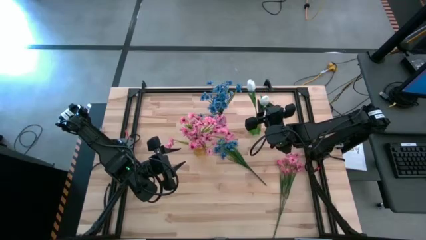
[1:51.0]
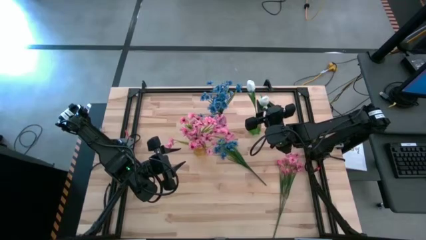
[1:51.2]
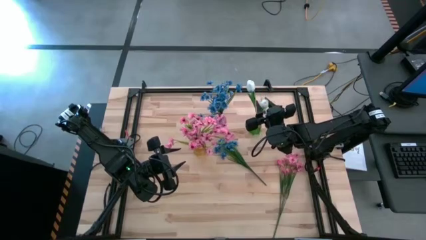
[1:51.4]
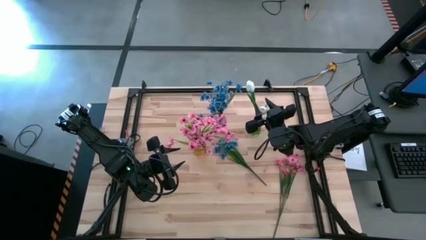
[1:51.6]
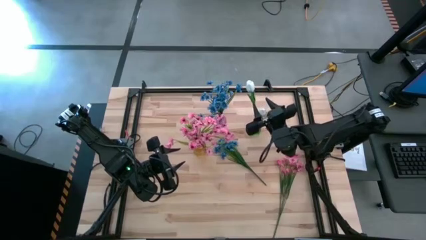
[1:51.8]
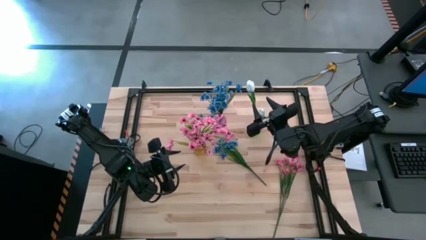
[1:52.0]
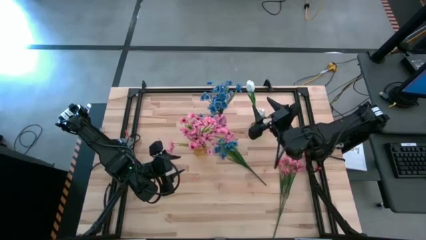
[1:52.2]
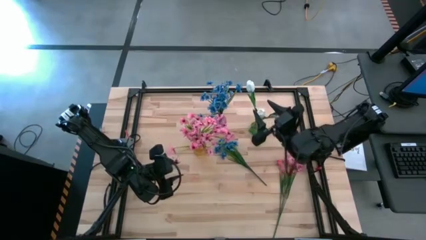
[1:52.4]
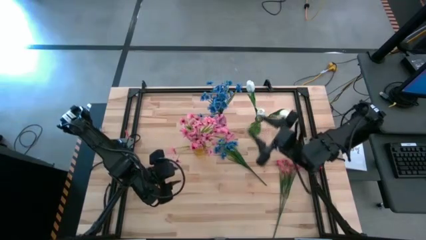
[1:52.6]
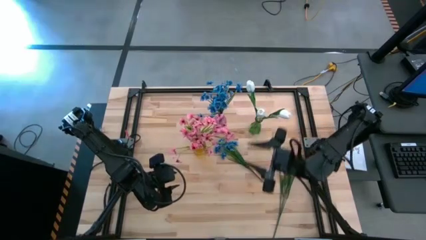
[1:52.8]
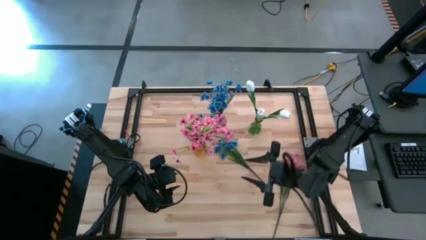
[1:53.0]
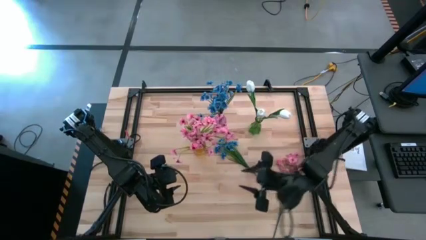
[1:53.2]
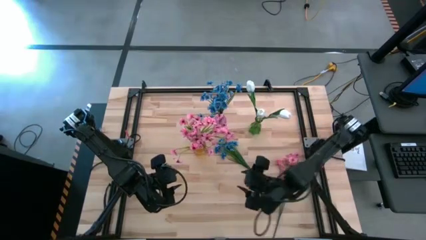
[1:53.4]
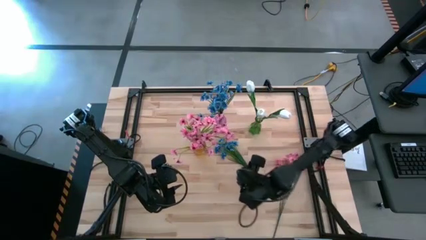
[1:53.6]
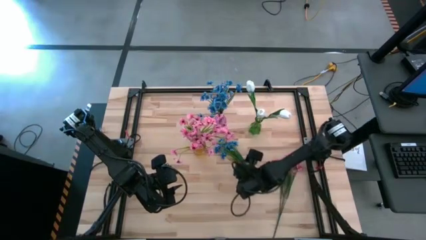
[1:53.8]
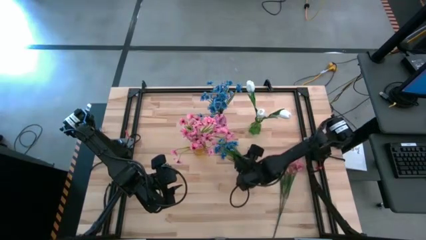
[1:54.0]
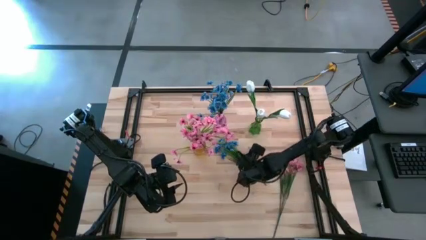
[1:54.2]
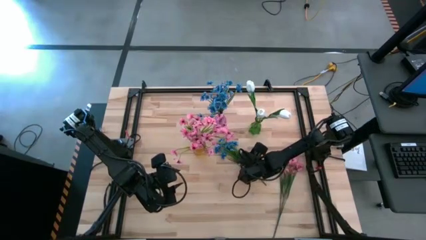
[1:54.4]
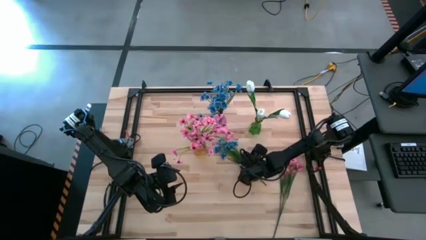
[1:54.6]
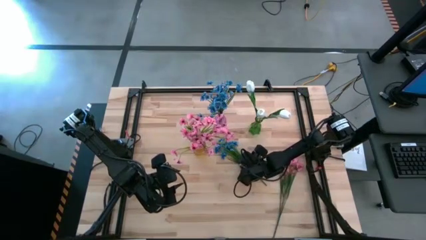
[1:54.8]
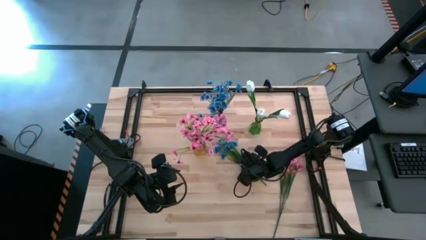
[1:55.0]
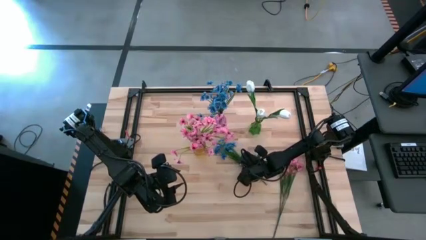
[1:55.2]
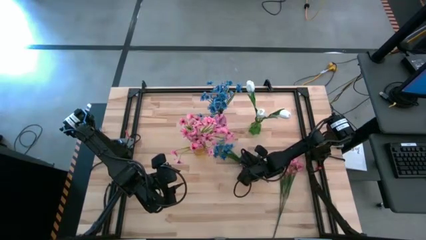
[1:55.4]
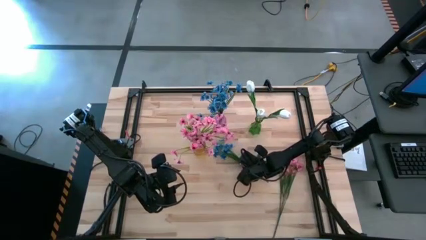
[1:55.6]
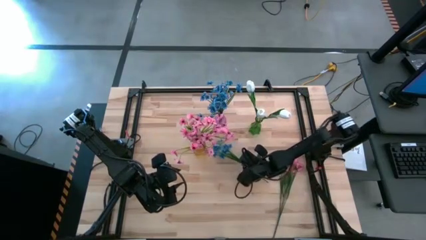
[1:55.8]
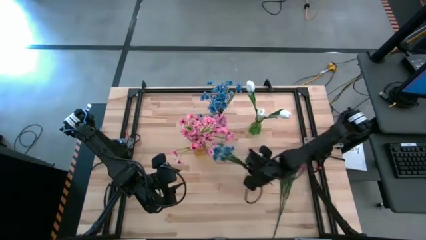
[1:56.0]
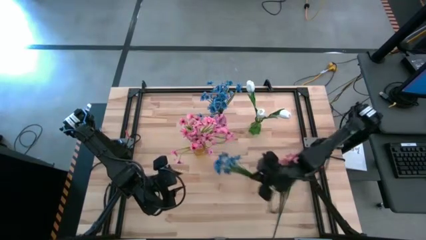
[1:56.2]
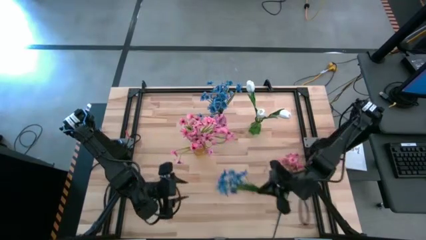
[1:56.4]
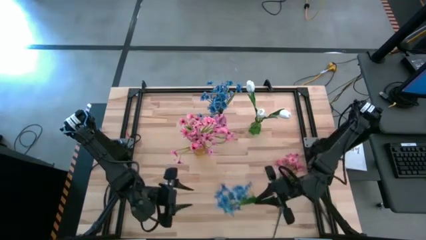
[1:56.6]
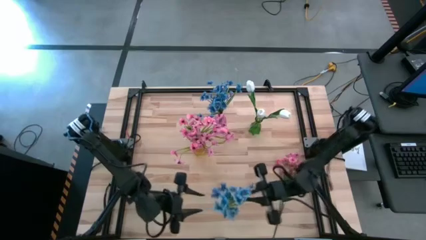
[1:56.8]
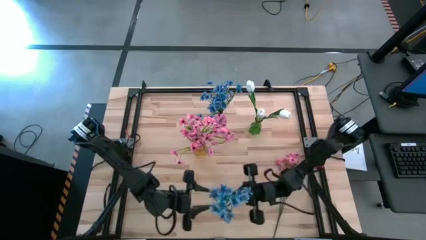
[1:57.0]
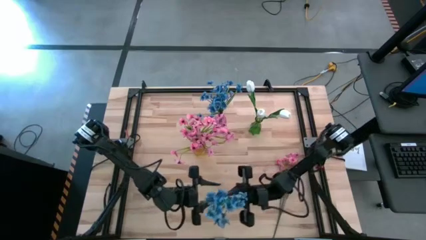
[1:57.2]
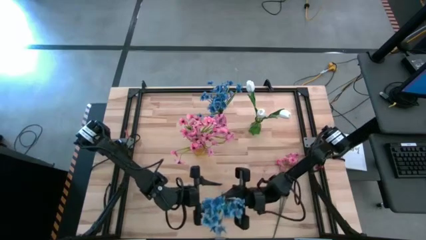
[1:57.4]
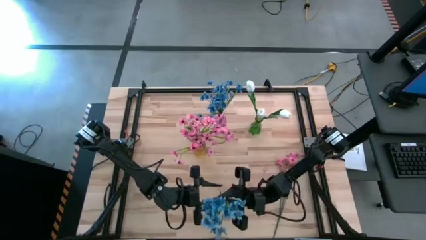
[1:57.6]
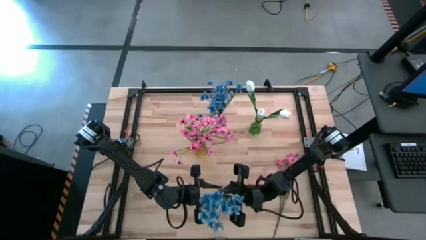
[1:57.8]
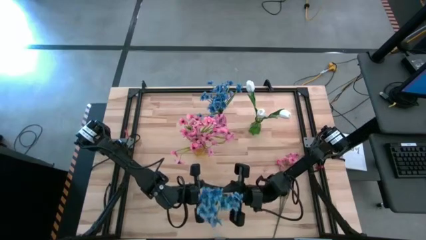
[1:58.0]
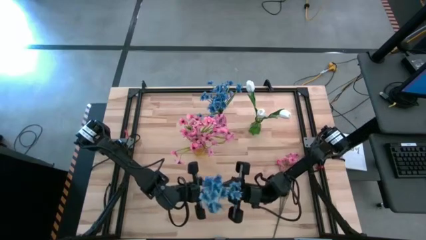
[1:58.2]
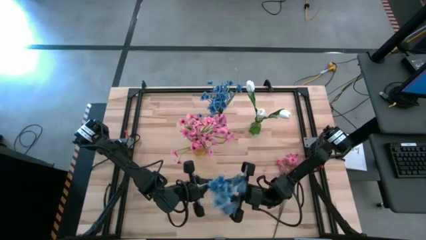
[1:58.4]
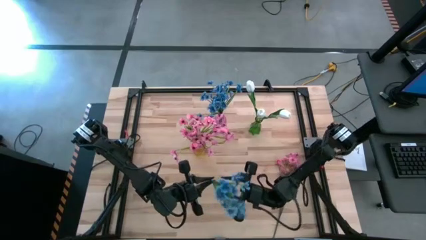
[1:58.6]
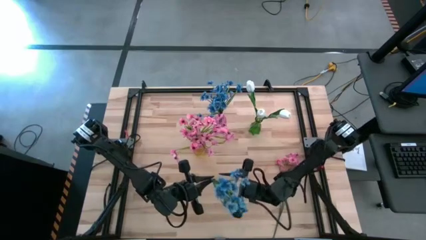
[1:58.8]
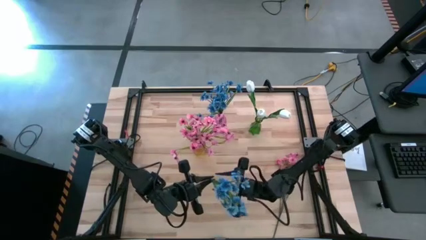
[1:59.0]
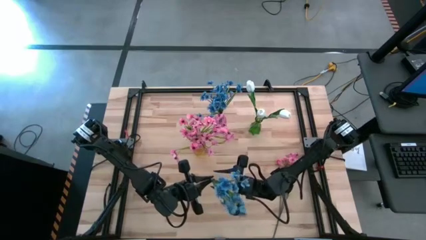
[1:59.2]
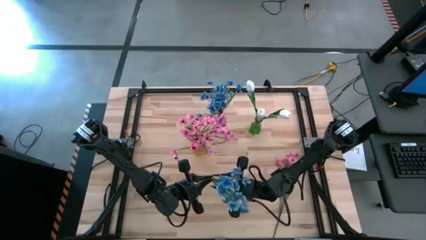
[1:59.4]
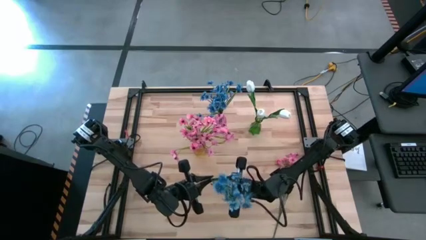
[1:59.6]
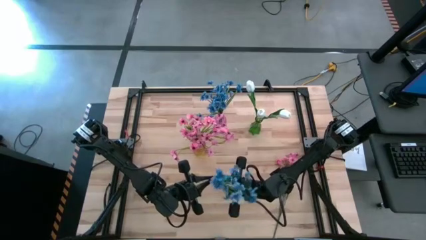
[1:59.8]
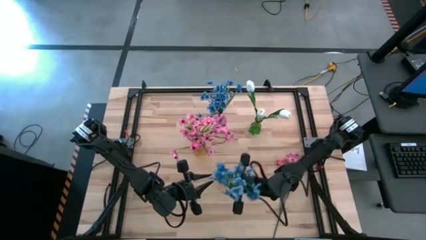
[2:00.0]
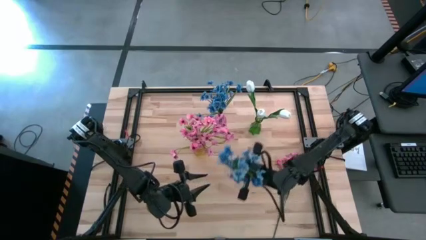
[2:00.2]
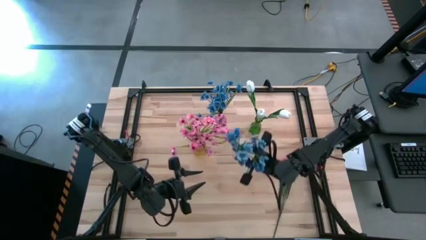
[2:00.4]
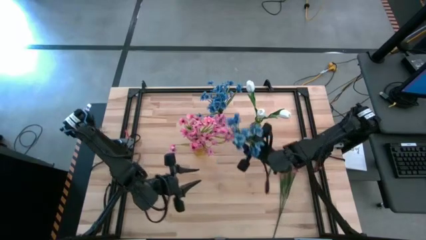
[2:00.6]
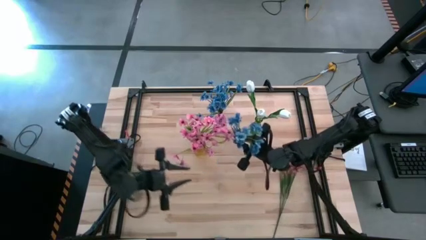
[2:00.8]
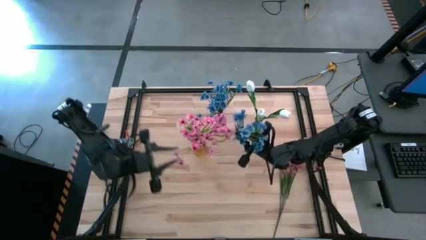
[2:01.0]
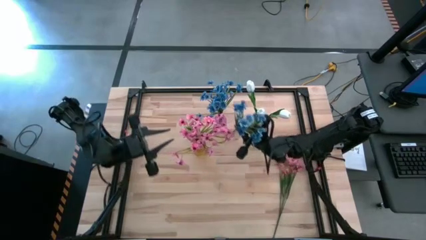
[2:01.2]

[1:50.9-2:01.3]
Task: Sort flowers into vase by color
Put the blue flowers into the purple flower vase

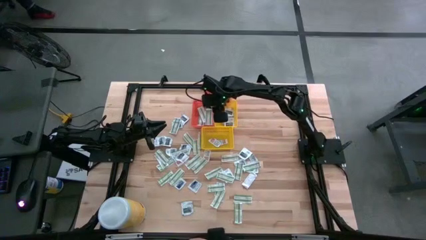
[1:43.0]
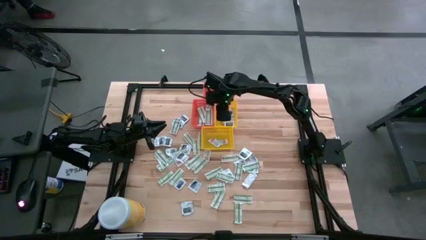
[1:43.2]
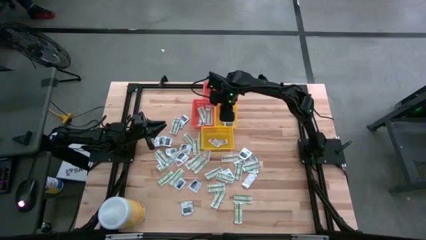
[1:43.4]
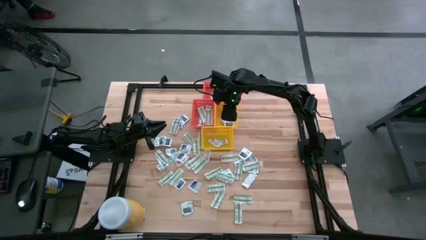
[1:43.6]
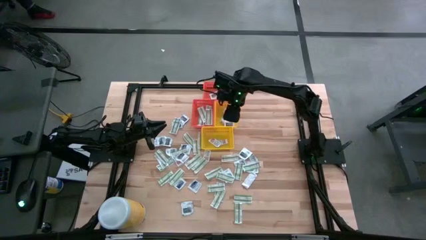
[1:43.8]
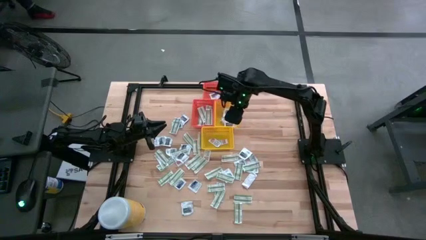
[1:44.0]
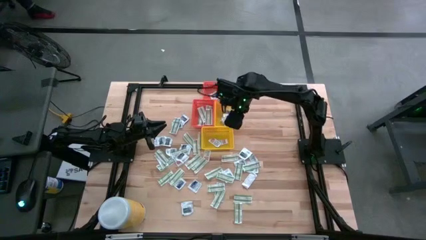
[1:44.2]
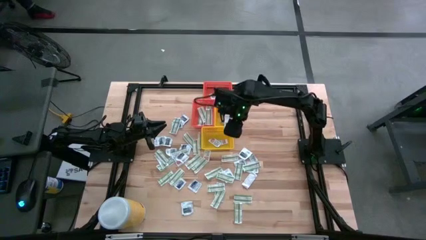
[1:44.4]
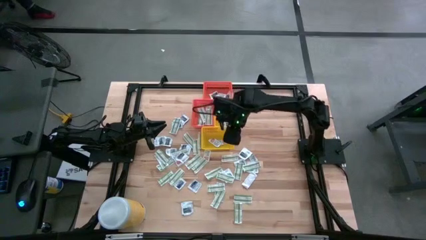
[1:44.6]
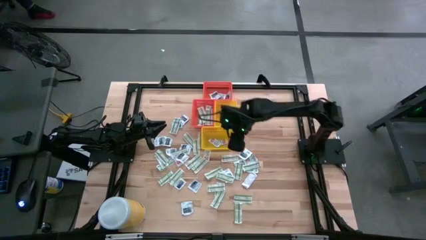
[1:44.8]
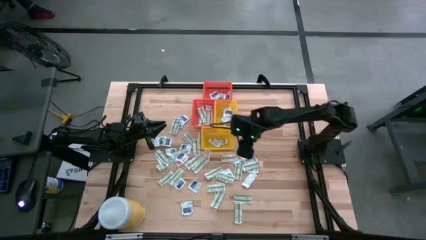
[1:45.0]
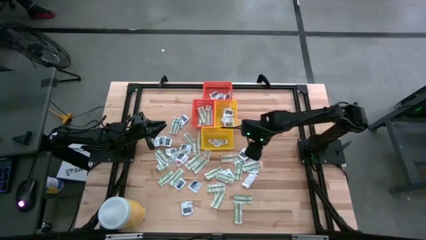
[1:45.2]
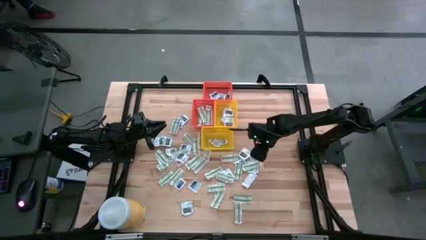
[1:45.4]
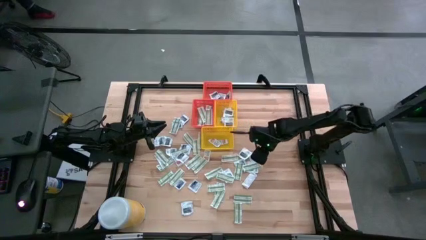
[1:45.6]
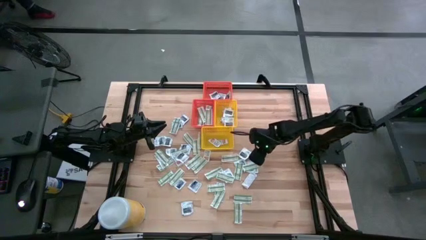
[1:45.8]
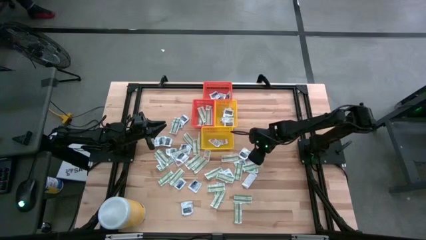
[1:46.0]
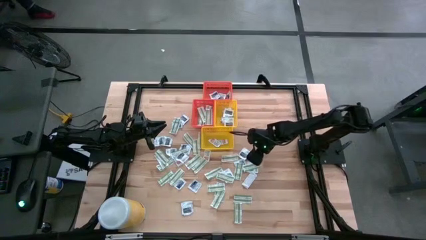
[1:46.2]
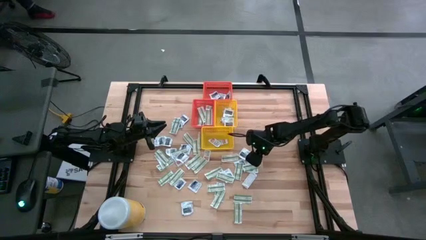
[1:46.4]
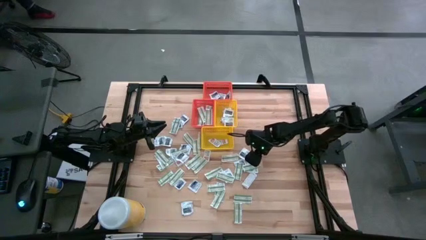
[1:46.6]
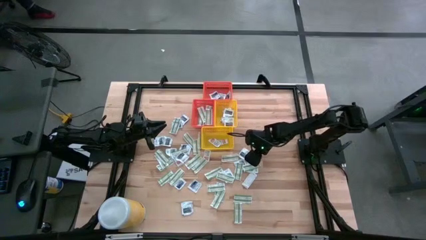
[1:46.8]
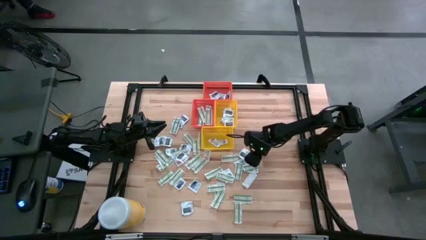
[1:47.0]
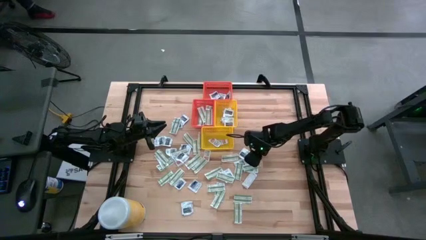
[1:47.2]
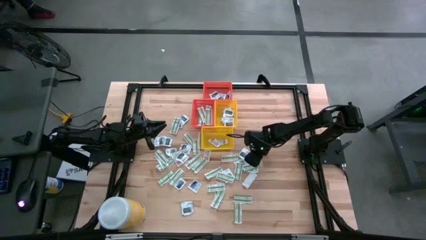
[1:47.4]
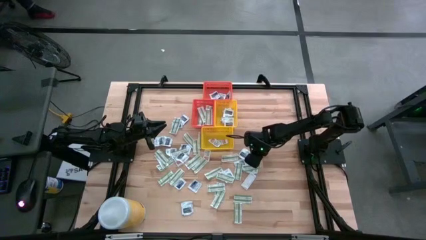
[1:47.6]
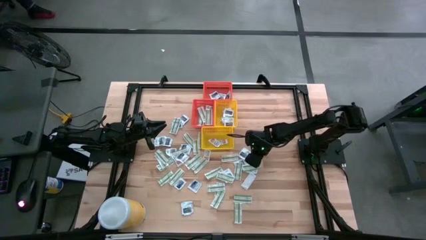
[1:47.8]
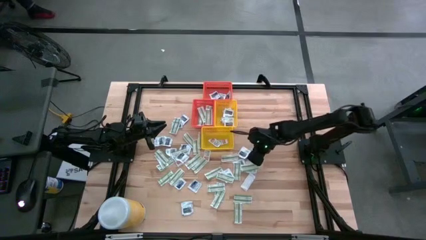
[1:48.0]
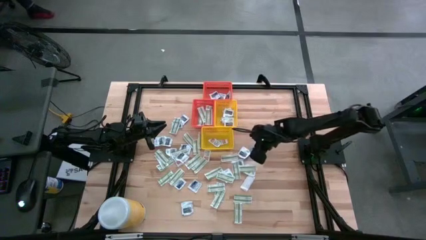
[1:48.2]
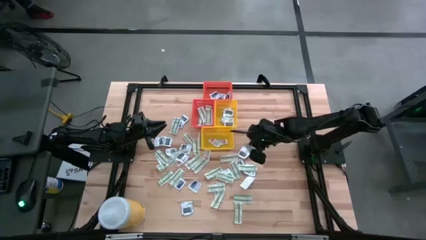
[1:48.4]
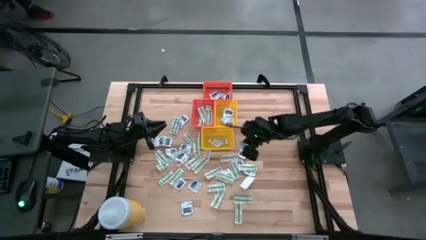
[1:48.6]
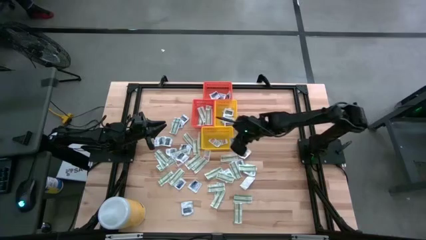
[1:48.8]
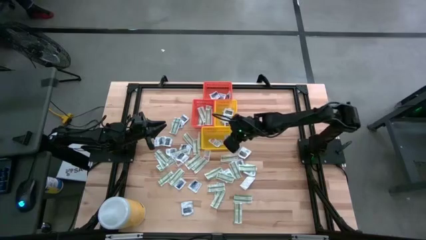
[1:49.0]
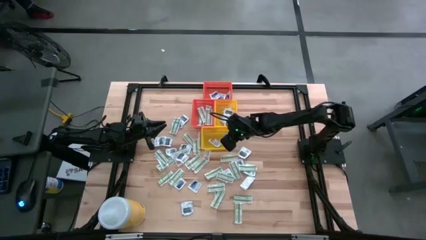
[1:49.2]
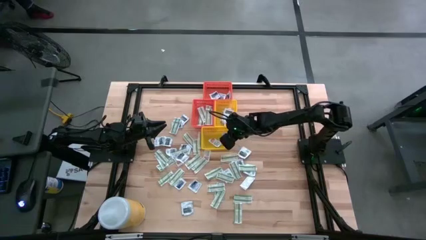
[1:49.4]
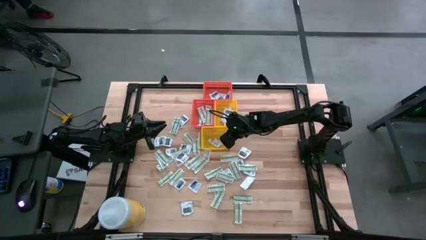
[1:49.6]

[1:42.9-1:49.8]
Task: Pick & Place First Aid Supplies
Put the ointment pack into the bottom yellow bin
